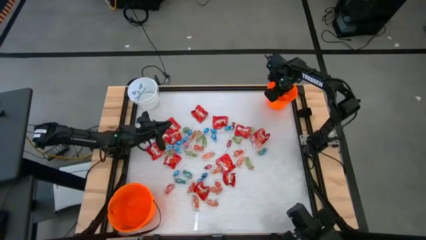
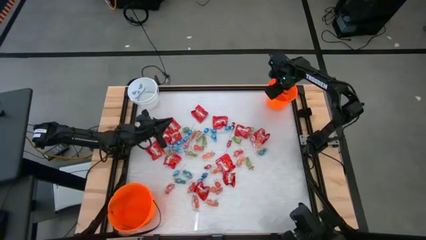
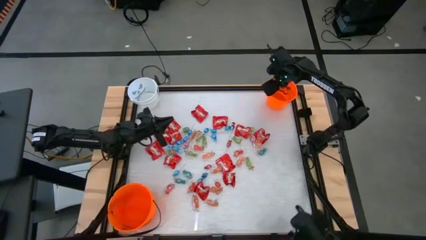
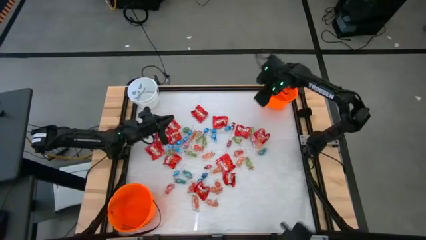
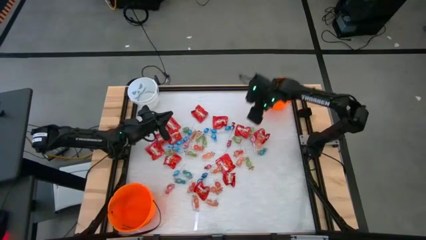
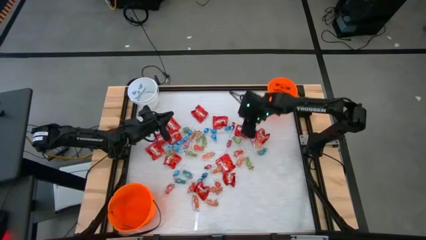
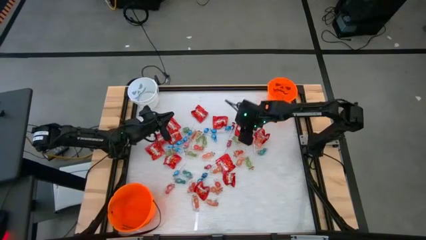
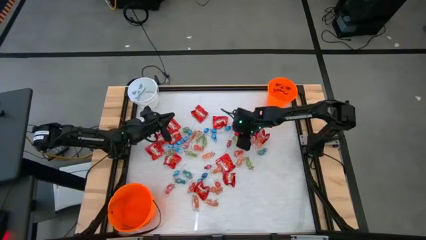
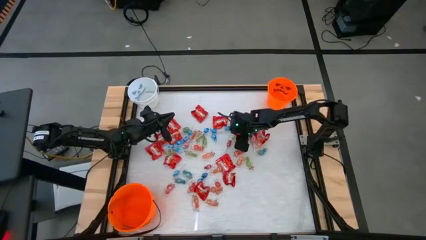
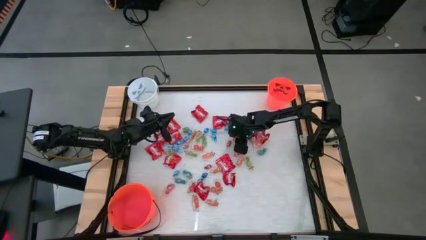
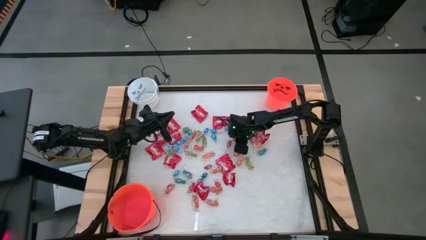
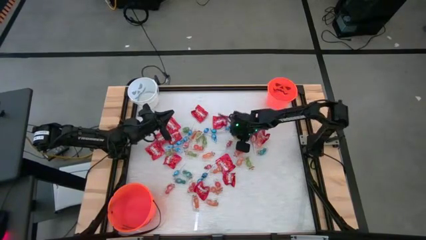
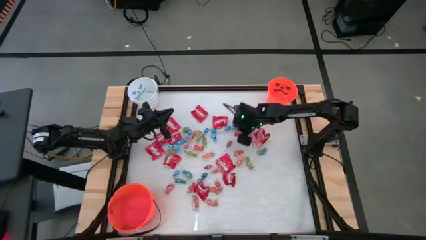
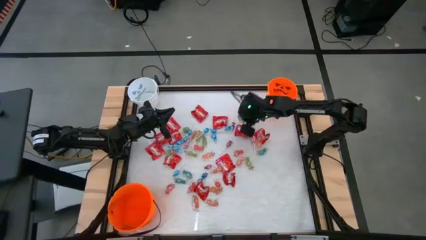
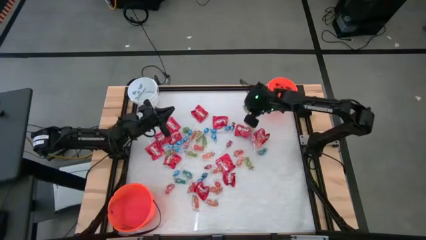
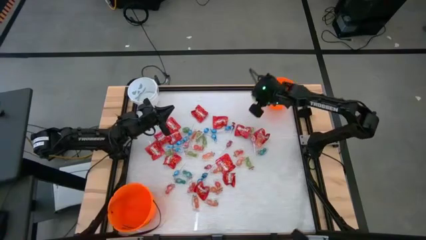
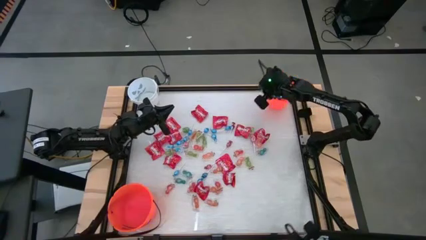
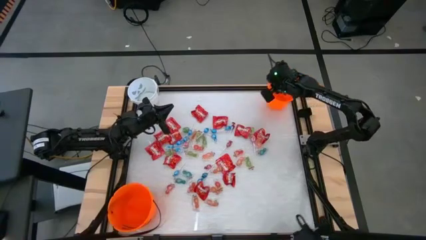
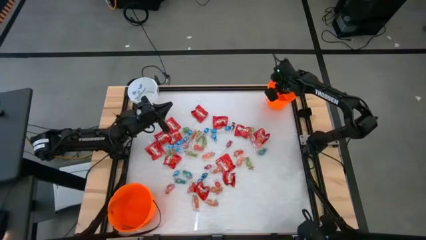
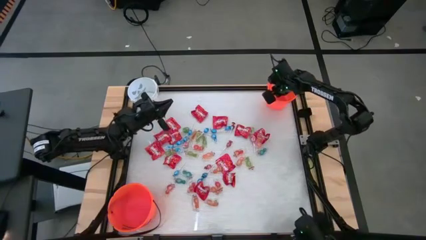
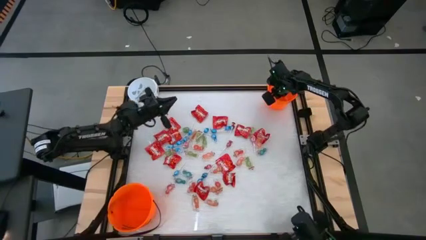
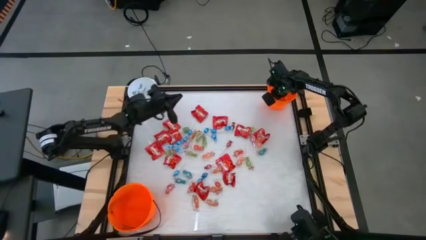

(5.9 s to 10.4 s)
Task: Sort candy by brand, put in halloween buckets
Put the green gummy into the top orange bucket

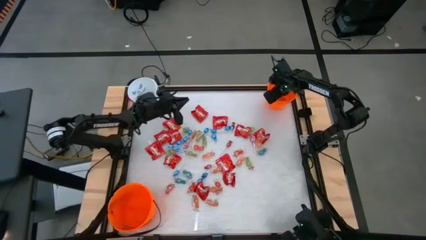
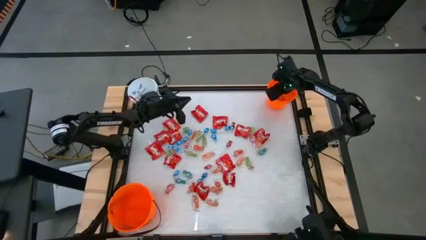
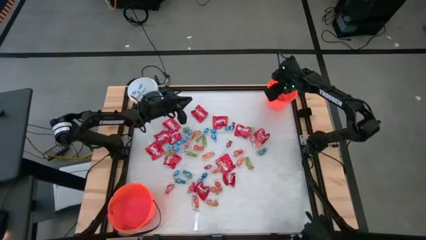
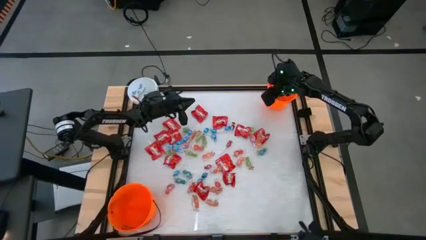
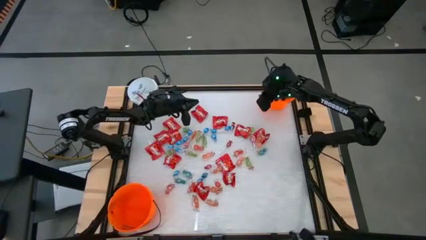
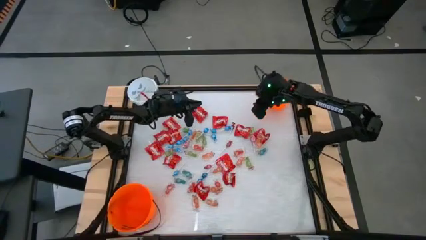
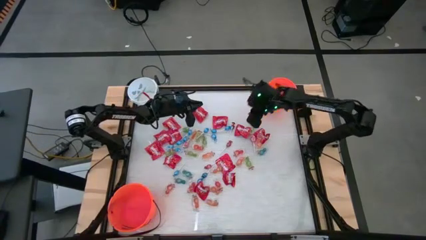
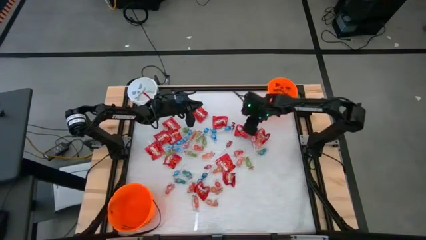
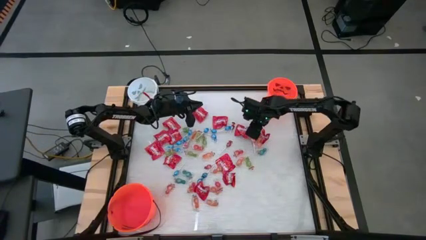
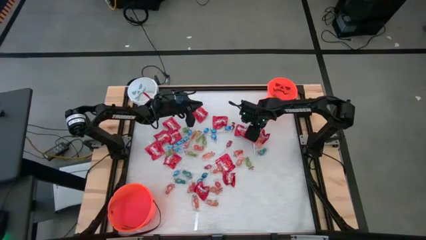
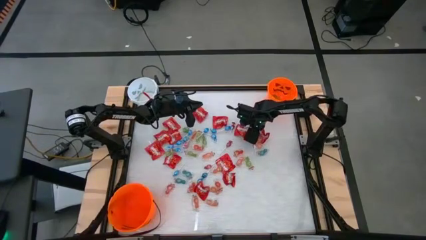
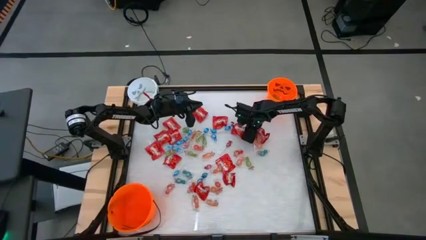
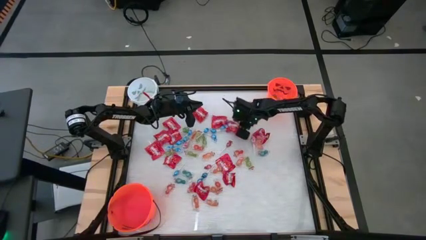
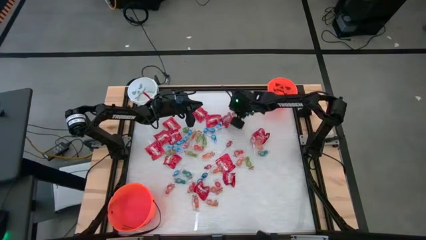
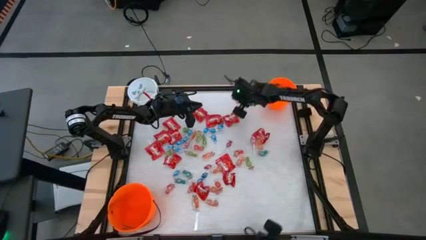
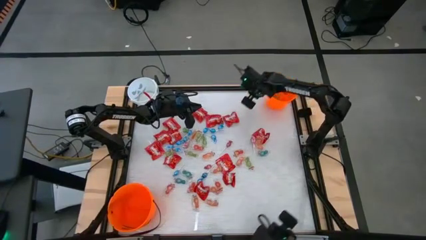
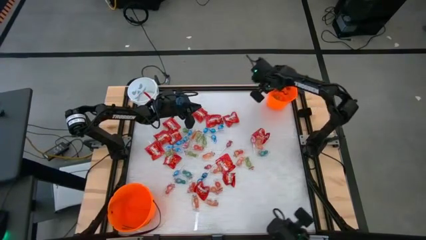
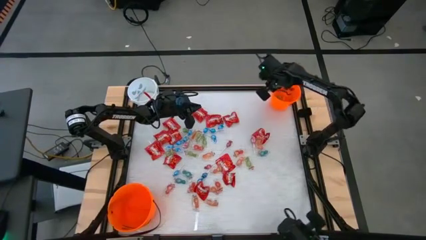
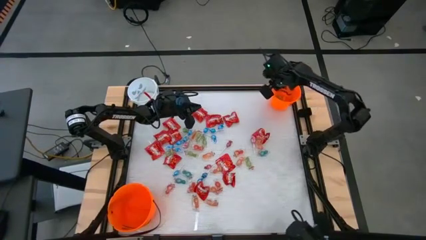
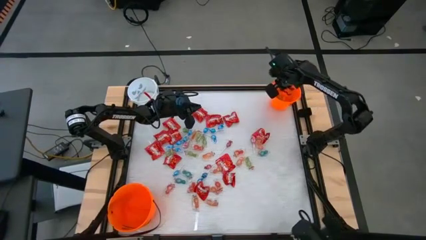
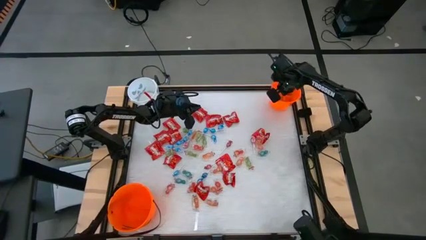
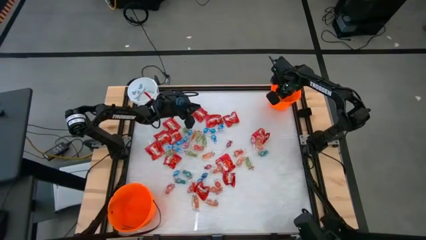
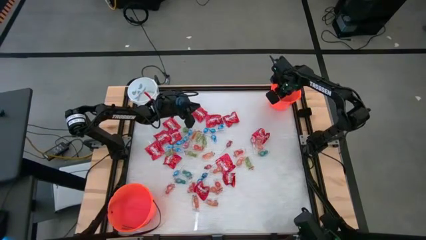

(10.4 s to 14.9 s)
Put the green gummy into the top orange bucket

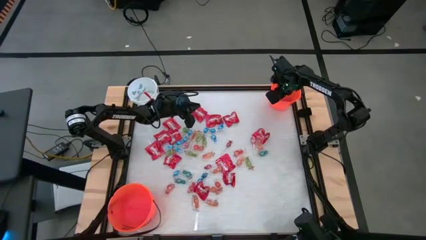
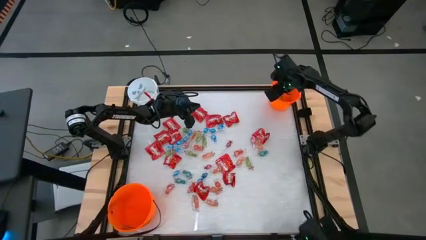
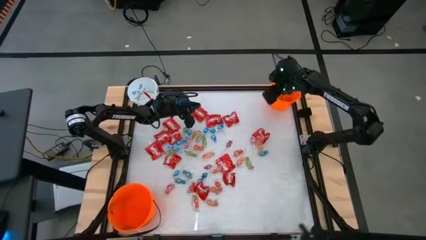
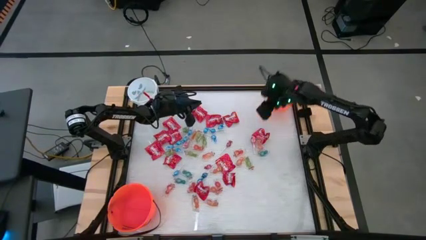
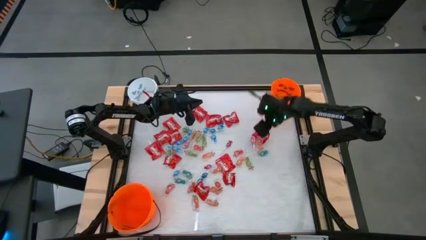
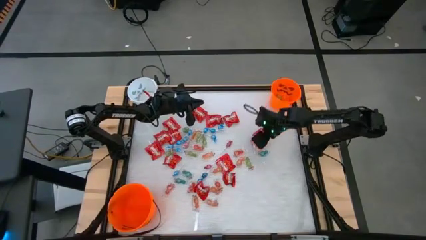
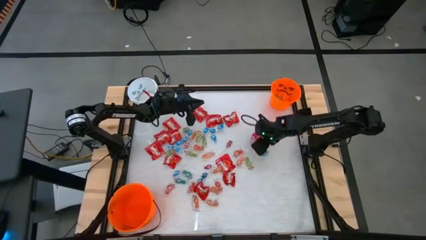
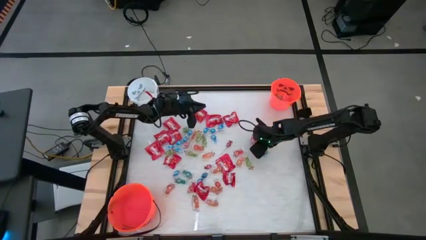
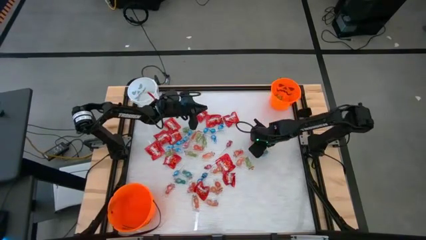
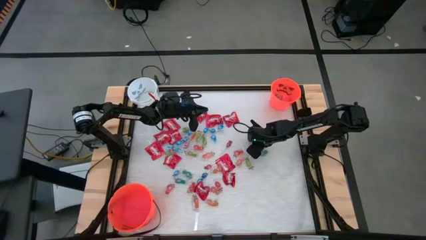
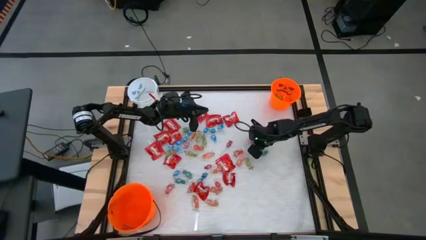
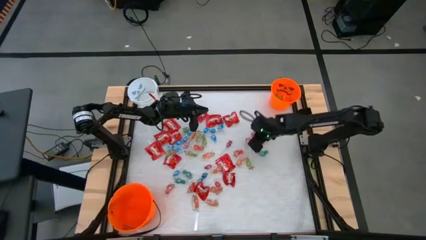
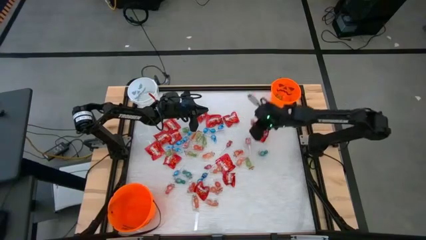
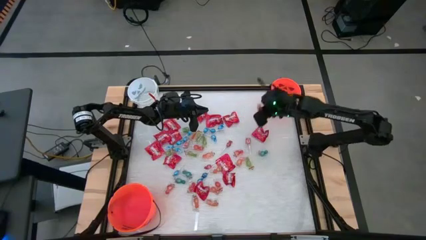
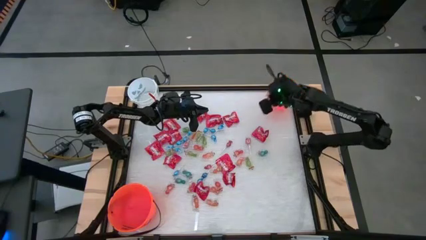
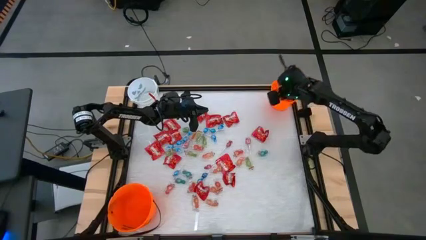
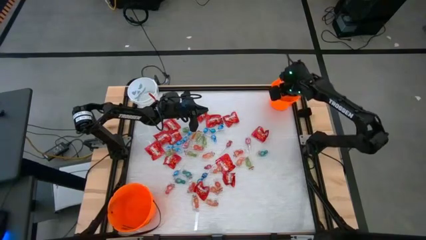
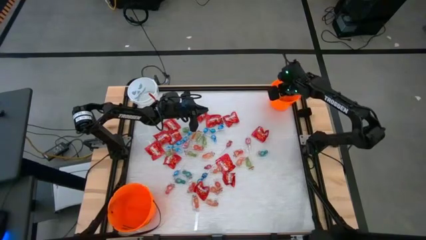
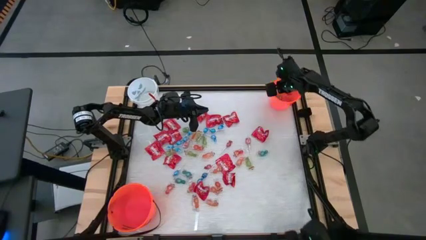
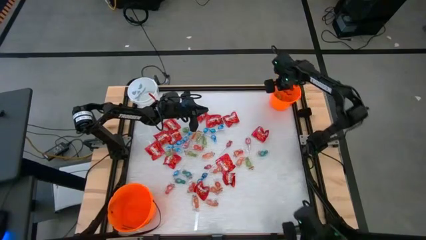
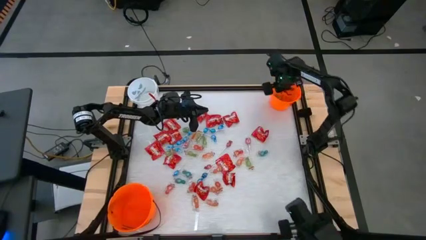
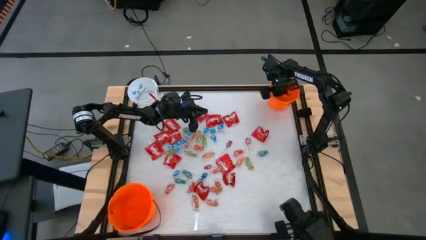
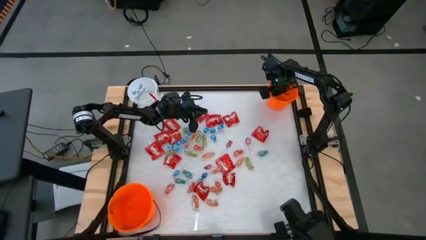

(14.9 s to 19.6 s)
Put the orange gummy into the top orange bucket

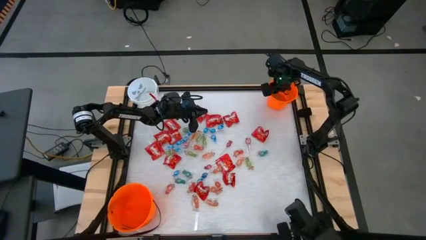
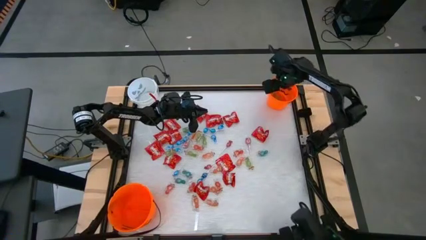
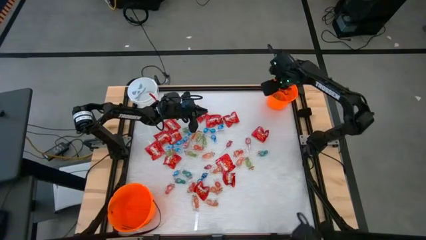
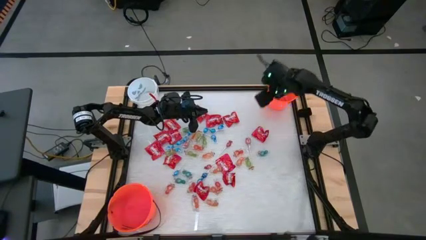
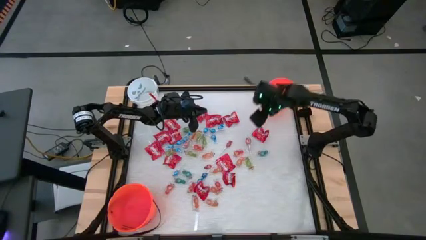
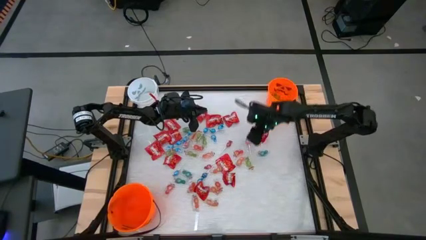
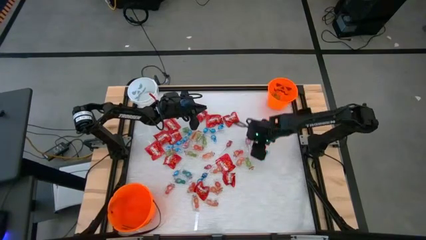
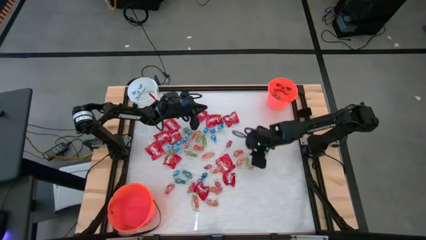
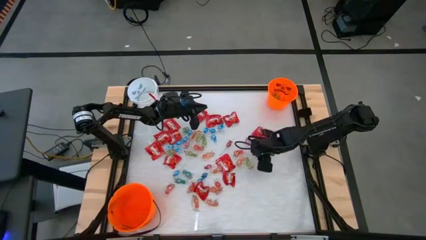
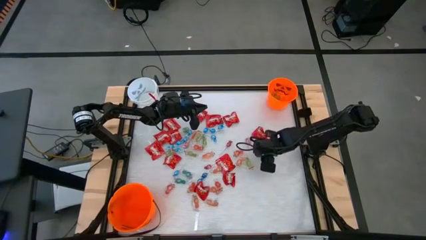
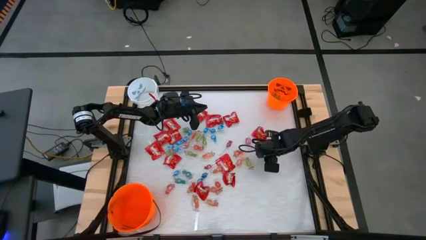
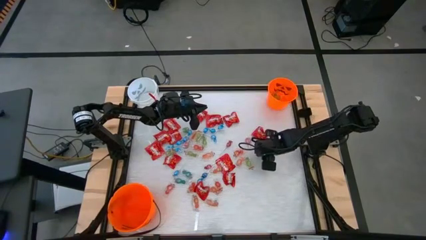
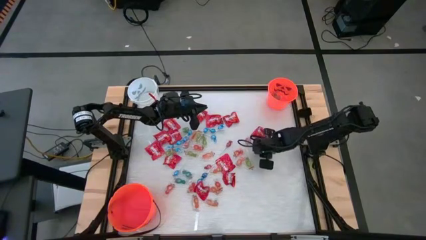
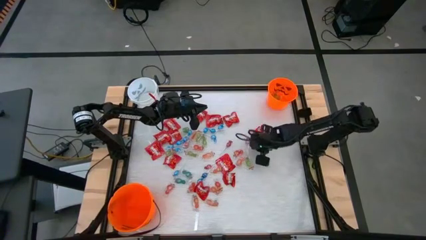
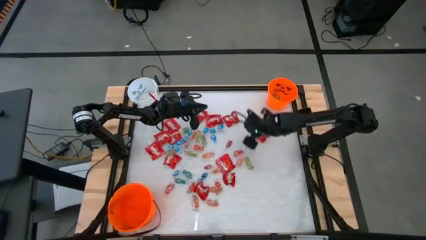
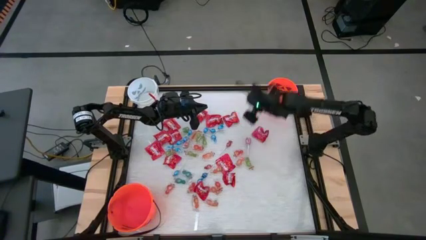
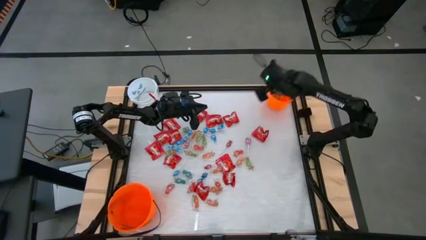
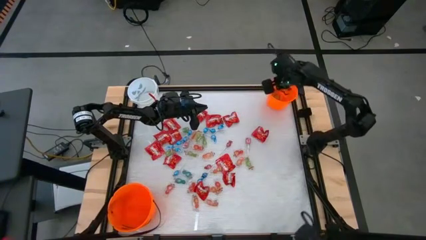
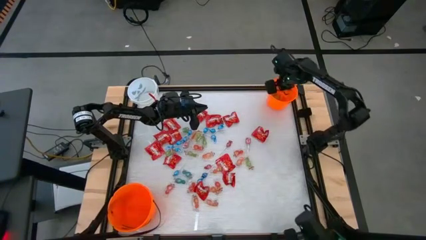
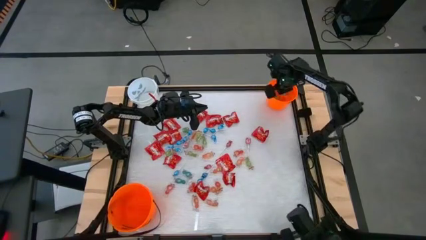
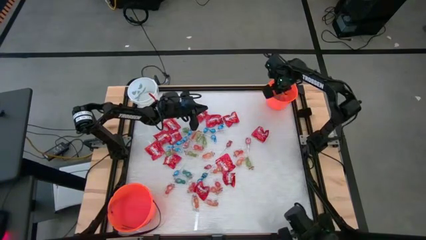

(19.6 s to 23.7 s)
Put the top blue gummy into the top orange bucket
